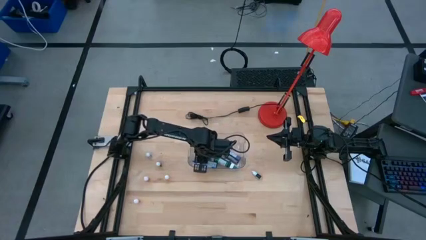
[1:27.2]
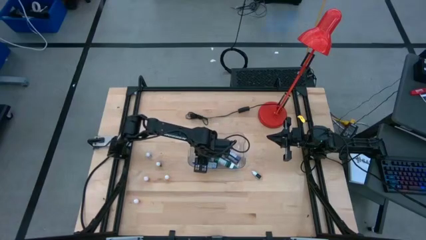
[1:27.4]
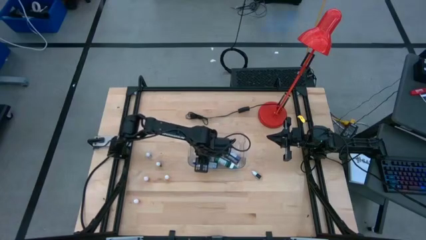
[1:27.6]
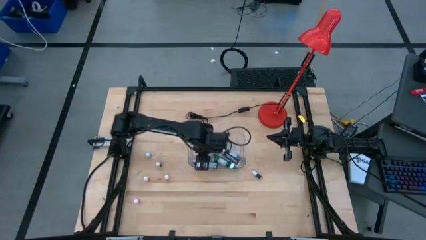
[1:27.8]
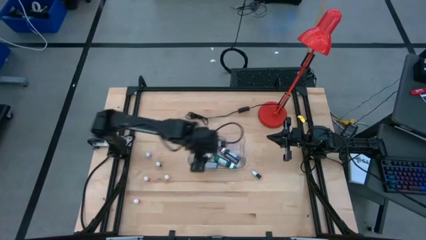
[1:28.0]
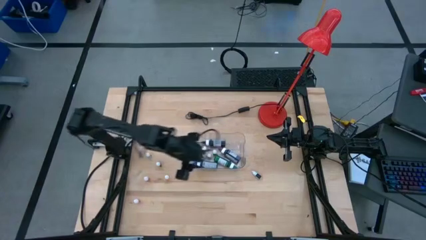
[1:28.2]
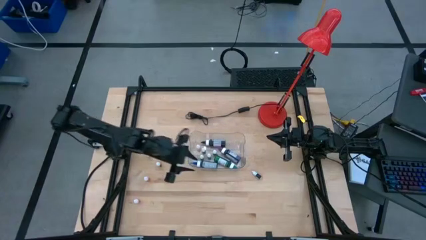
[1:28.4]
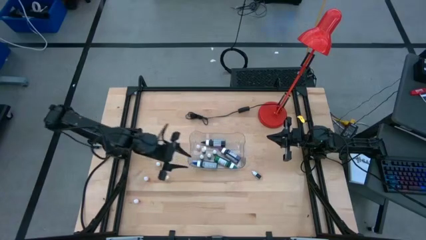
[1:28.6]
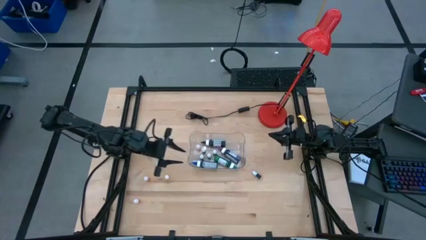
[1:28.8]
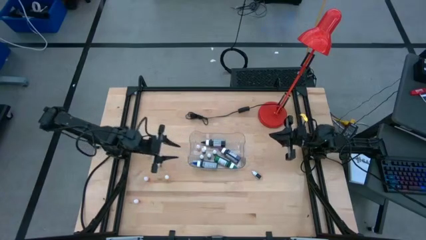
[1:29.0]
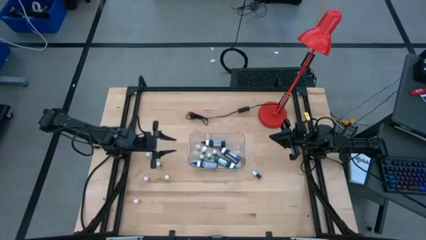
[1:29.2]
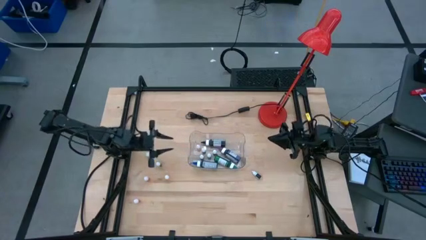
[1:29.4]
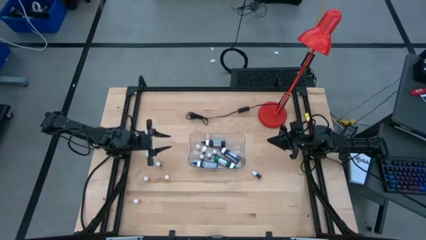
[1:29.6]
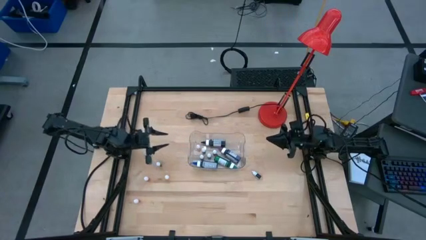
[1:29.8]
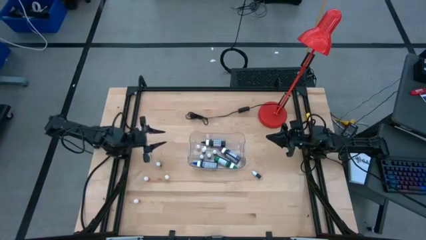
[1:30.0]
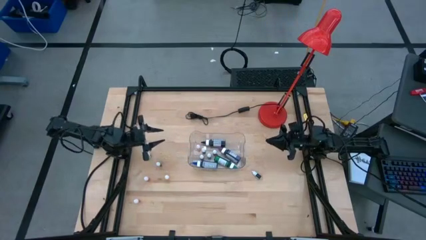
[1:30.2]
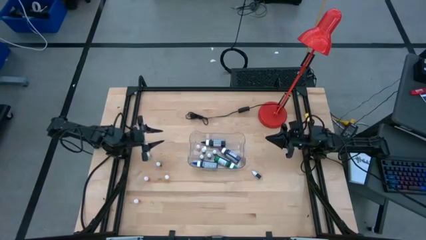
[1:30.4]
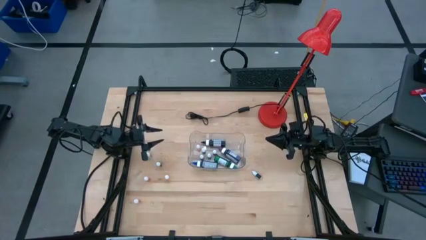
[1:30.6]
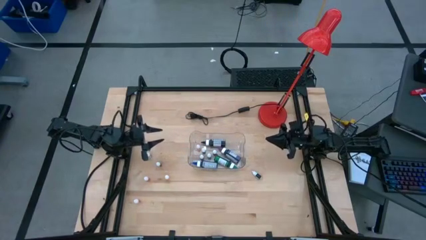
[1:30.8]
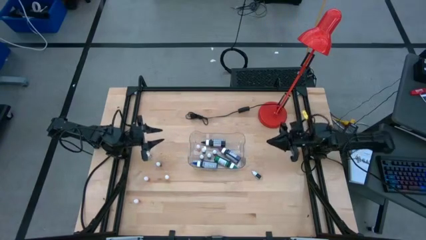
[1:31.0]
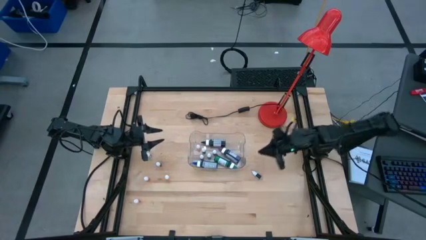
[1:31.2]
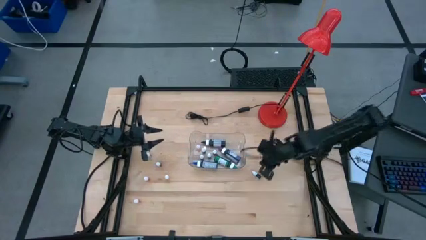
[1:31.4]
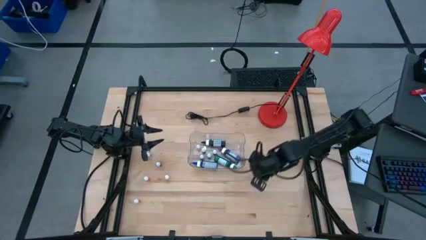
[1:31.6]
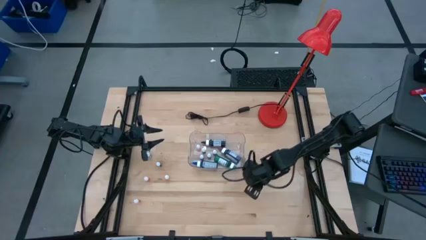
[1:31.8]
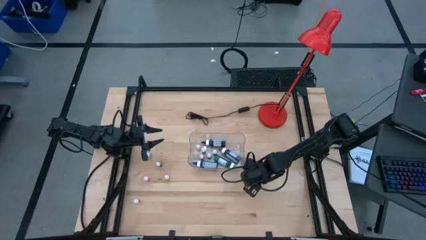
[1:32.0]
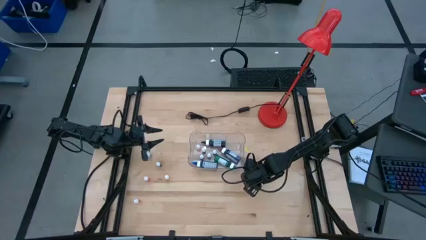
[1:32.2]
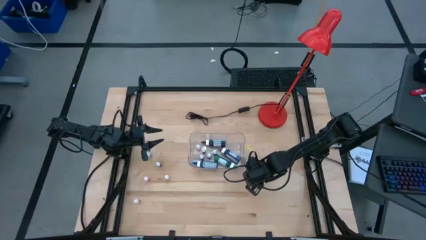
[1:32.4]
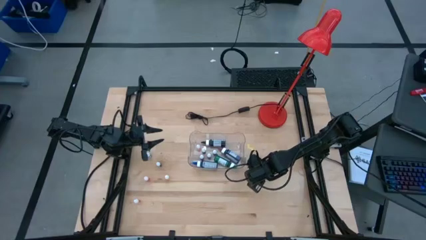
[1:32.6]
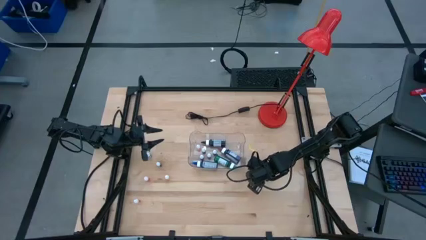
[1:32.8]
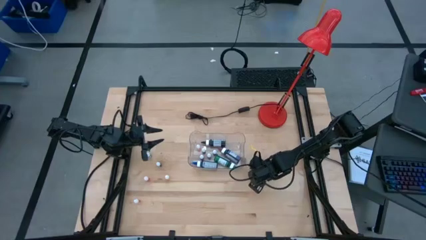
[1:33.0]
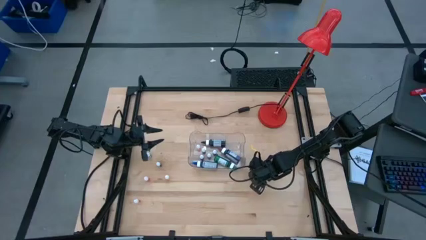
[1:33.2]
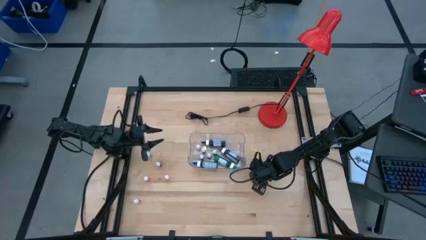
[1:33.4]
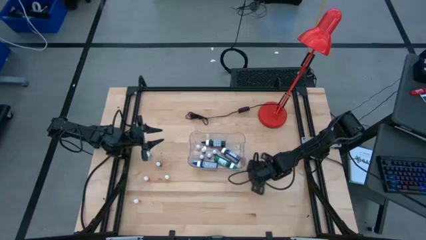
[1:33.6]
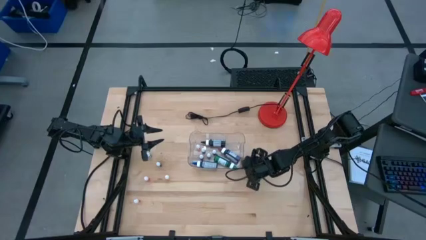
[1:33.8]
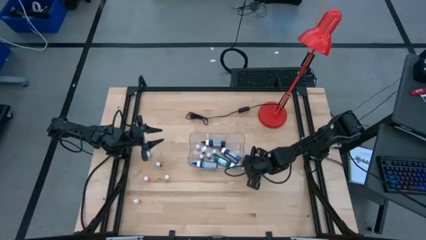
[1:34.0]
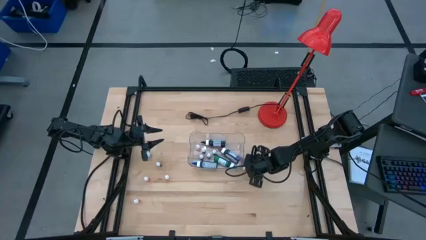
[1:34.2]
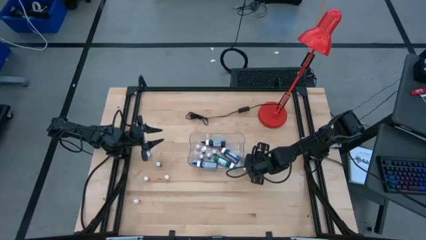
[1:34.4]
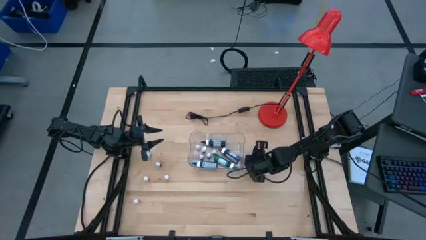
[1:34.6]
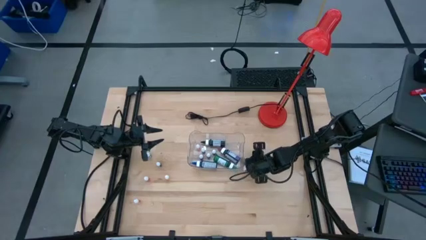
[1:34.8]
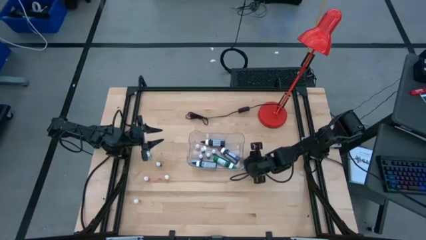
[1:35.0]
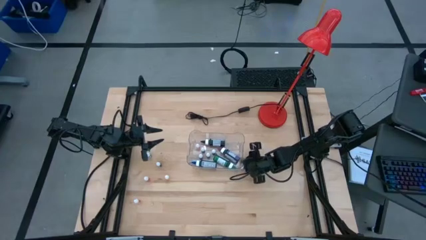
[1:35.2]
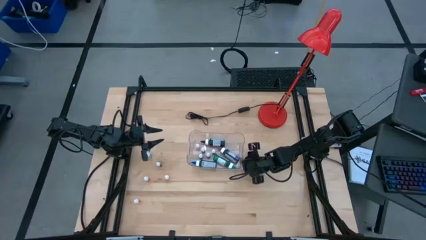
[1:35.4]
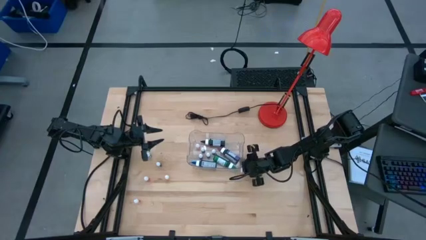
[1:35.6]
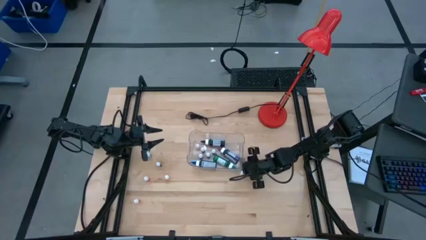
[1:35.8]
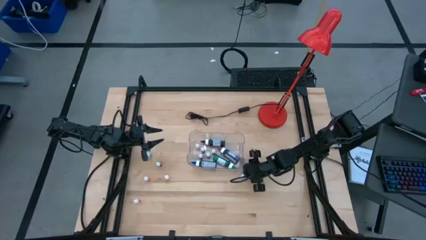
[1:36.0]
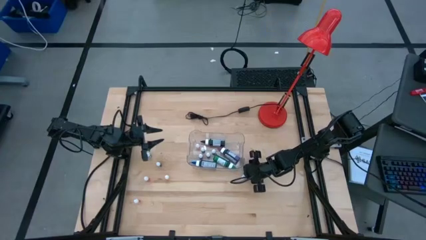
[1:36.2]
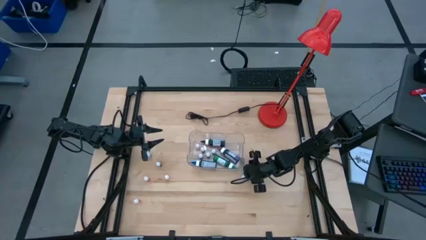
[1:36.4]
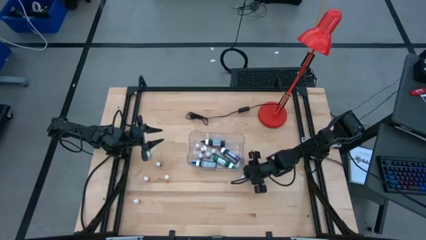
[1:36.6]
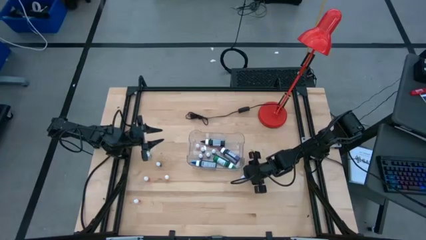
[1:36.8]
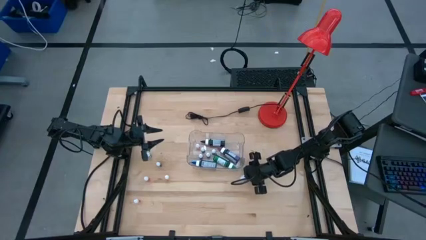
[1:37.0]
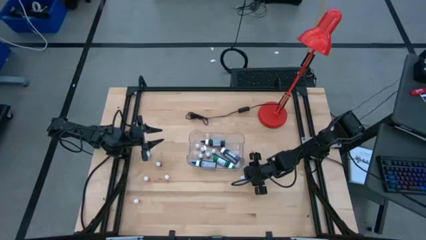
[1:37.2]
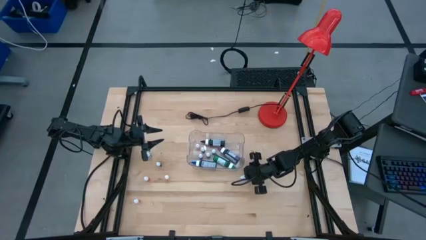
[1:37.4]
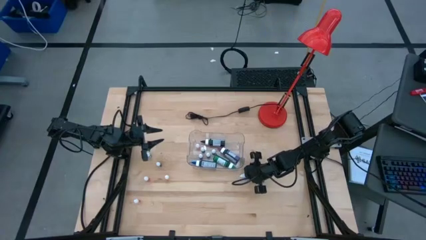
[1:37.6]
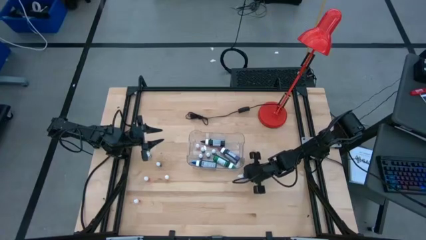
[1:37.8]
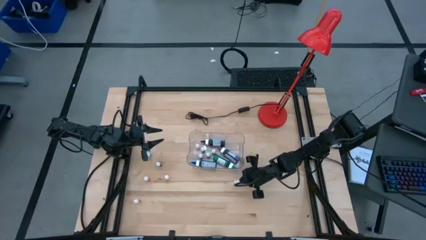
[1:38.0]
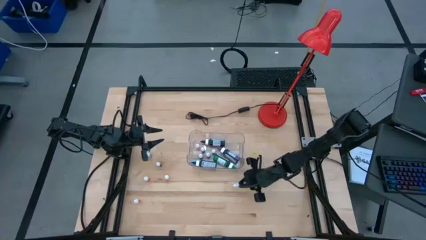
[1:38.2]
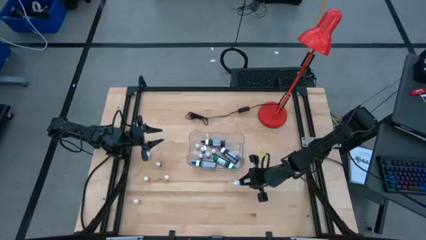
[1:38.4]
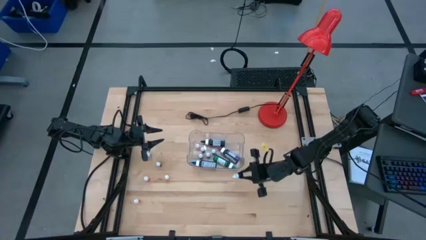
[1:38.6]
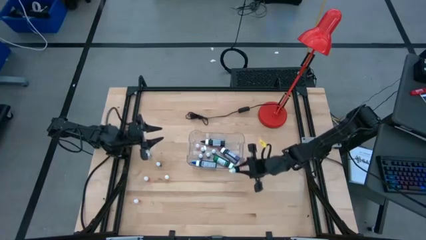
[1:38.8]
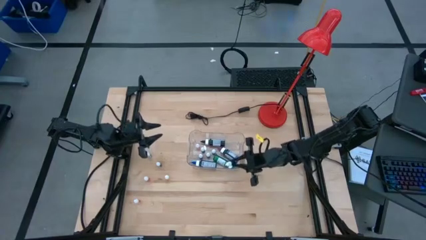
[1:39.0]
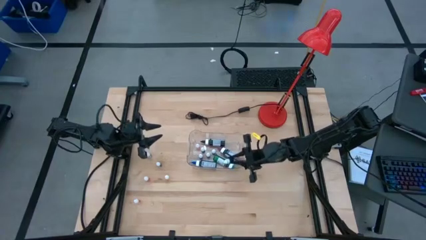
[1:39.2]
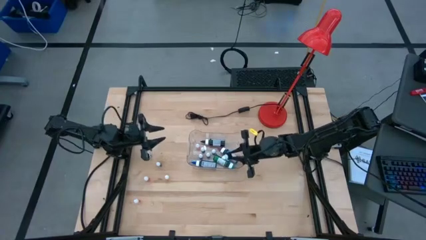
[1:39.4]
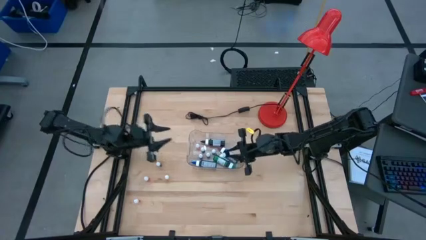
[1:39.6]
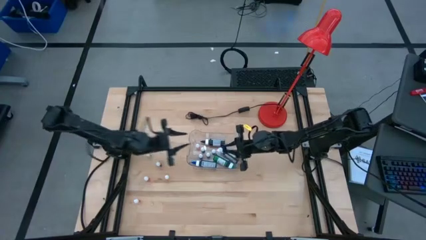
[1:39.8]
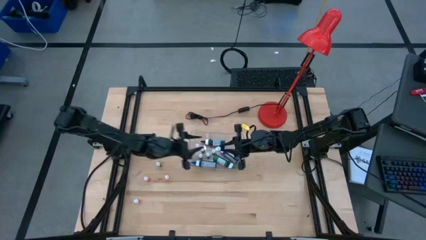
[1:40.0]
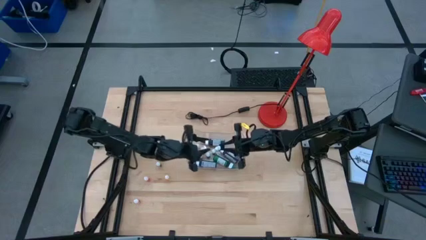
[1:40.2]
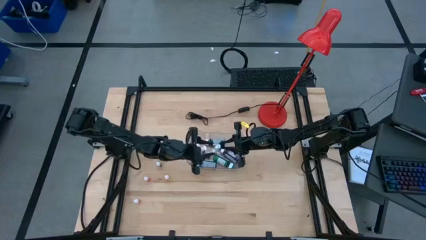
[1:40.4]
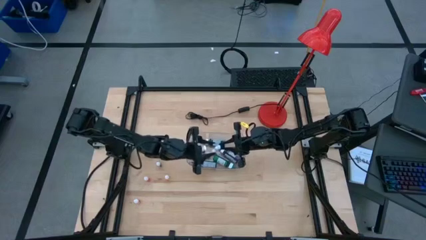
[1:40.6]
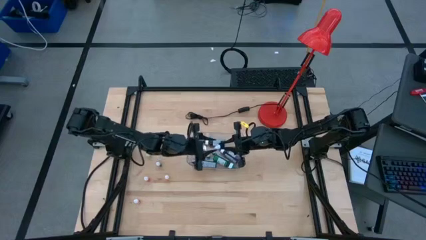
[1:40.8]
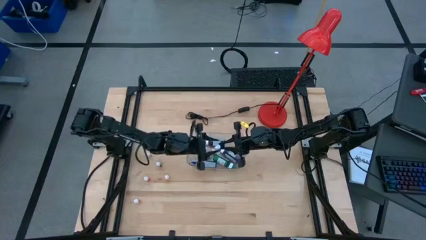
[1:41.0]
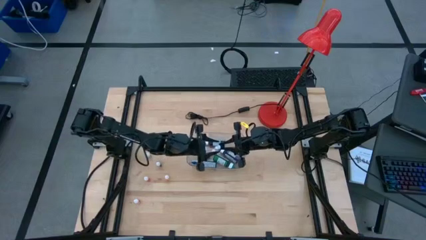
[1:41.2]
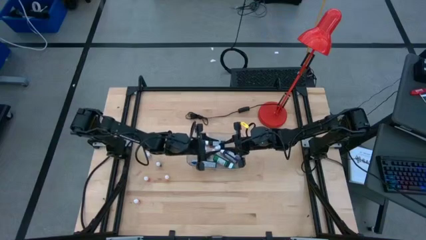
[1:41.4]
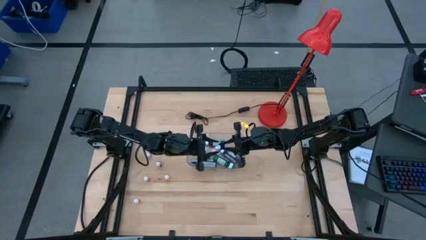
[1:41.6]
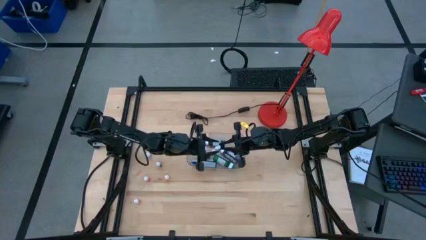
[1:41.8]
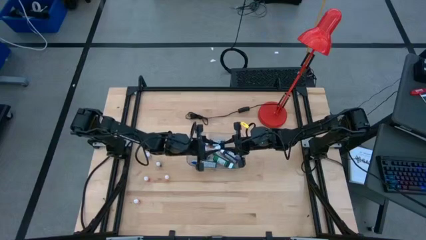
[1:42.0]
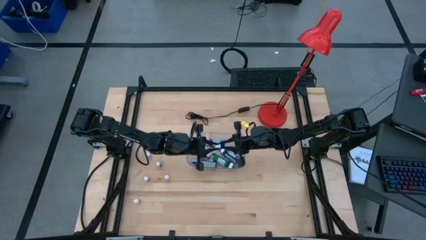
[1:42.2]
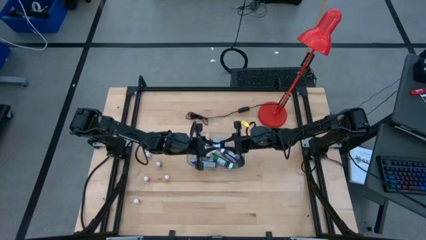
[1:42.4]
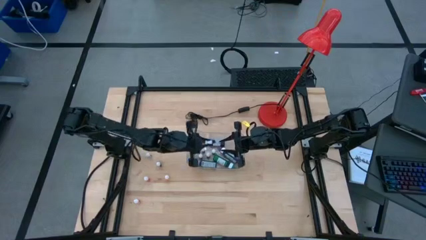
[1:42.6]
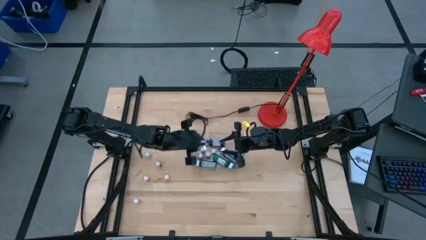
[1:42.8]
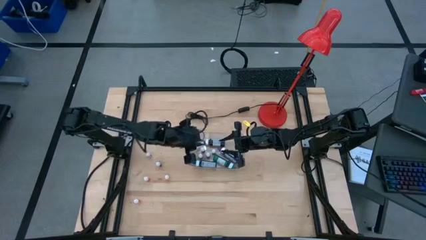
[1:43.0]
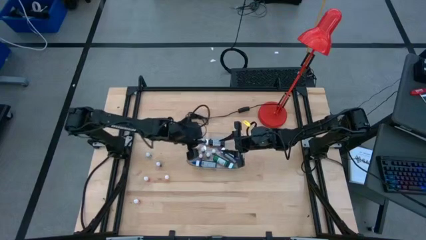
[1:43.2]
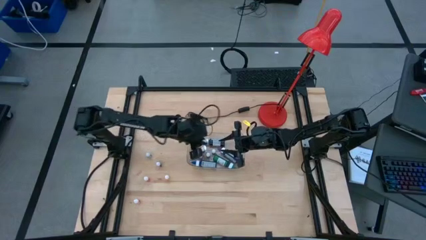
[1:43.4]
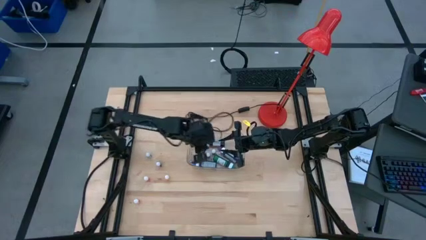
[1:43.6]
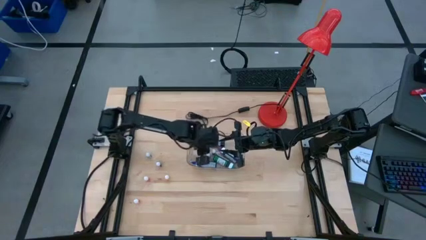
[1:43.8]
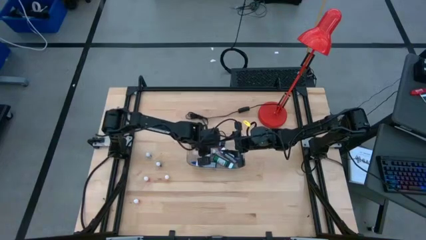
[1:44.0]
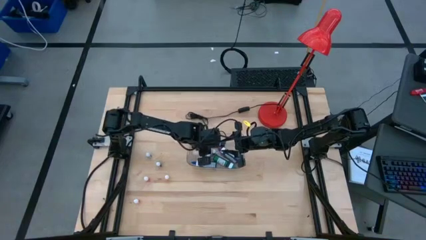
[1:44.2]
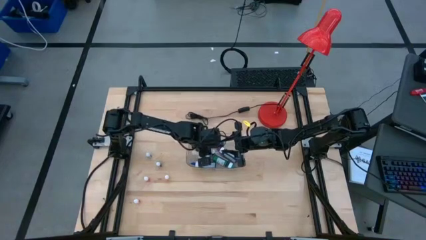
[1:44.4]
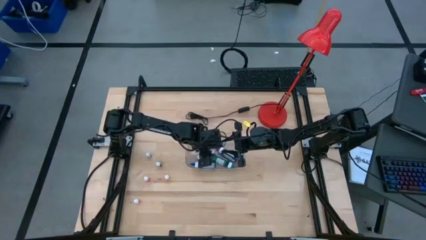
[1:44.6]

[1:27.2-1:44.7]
Task: Pick & Place food coloring
Put the small blue food coloring bottle into the transparent bin
